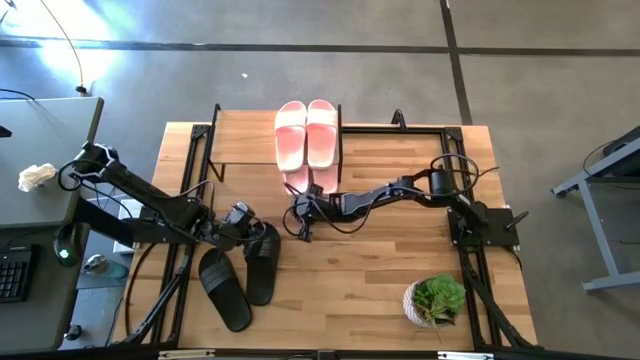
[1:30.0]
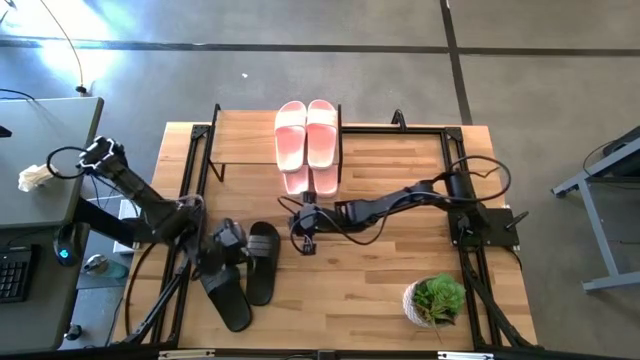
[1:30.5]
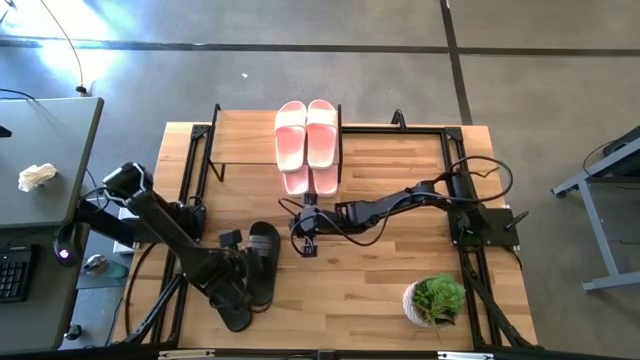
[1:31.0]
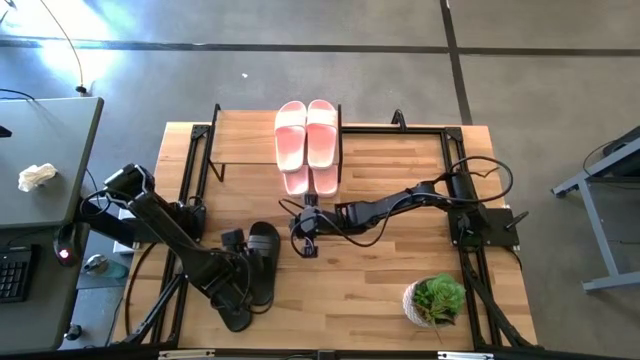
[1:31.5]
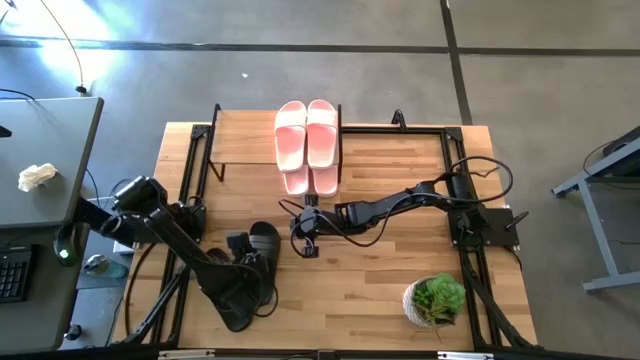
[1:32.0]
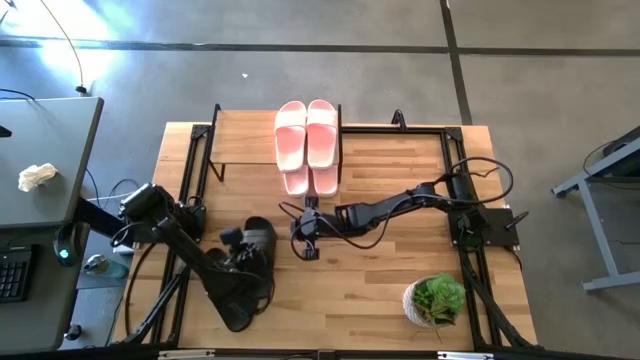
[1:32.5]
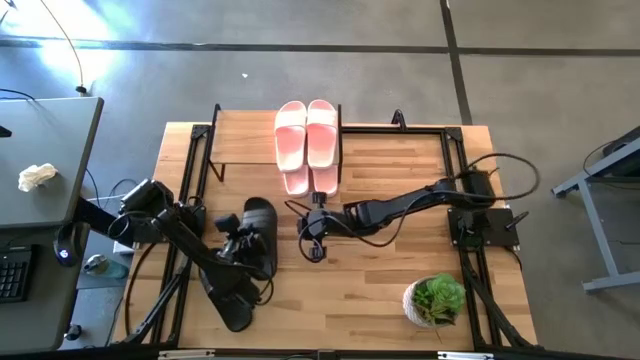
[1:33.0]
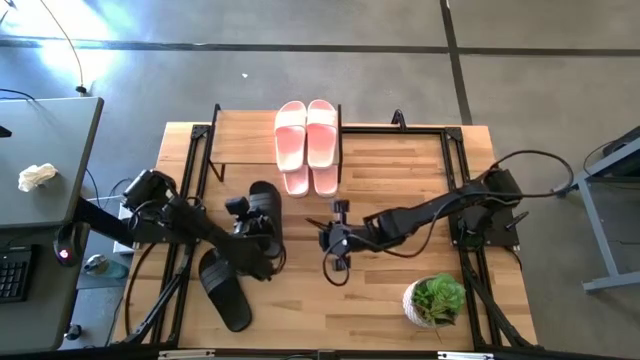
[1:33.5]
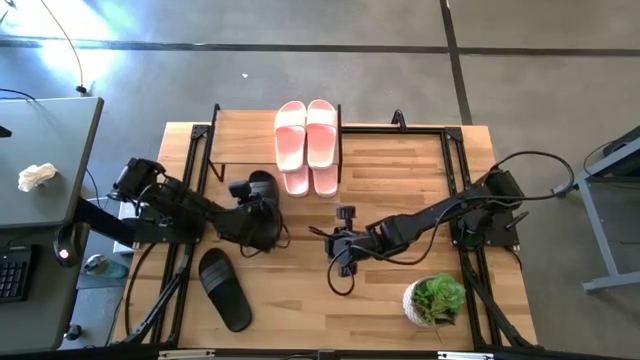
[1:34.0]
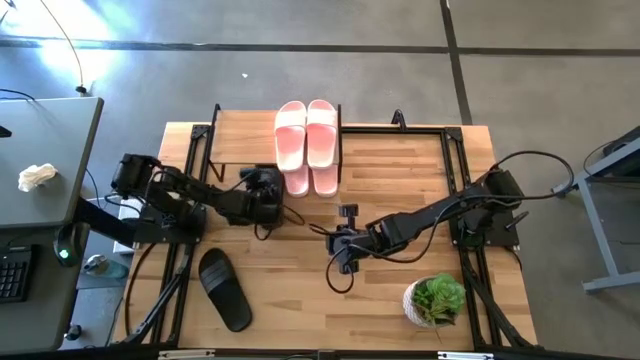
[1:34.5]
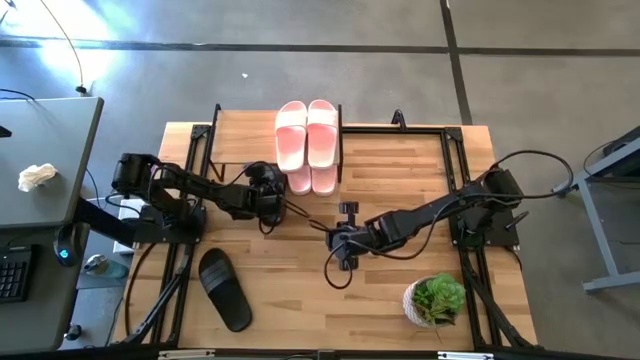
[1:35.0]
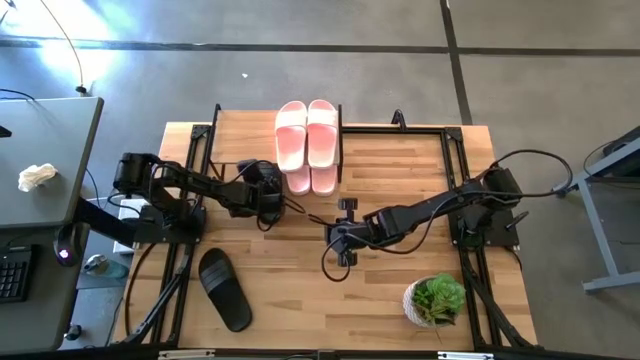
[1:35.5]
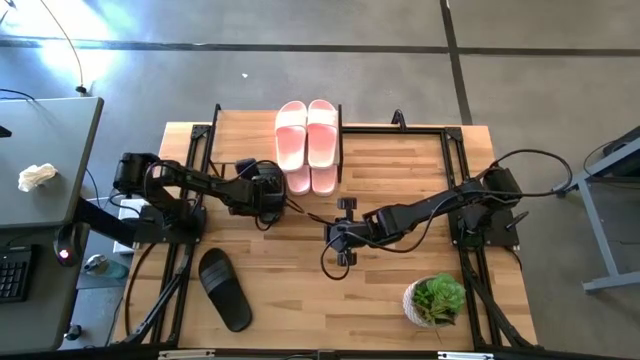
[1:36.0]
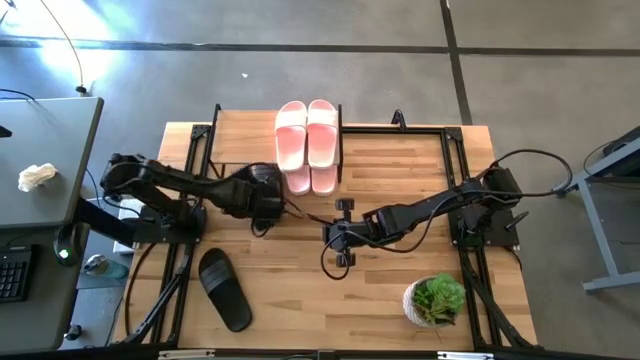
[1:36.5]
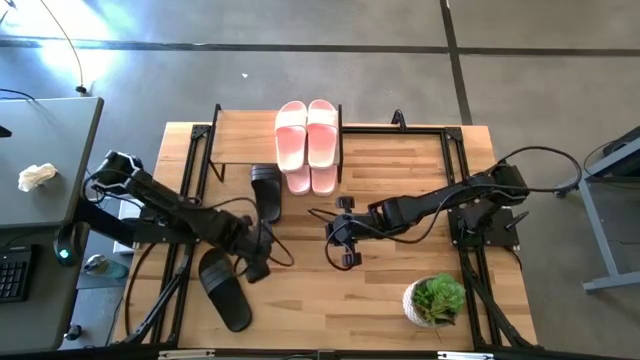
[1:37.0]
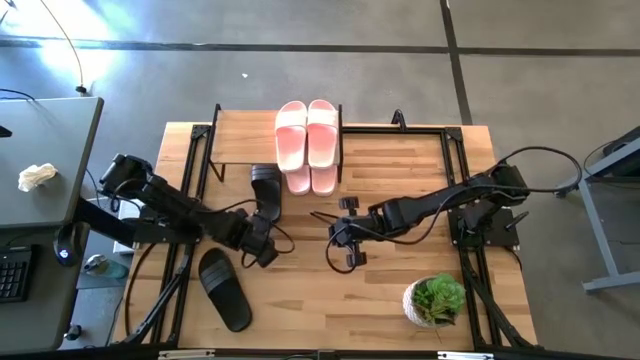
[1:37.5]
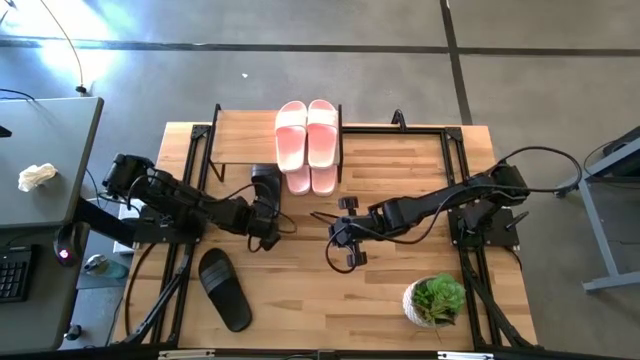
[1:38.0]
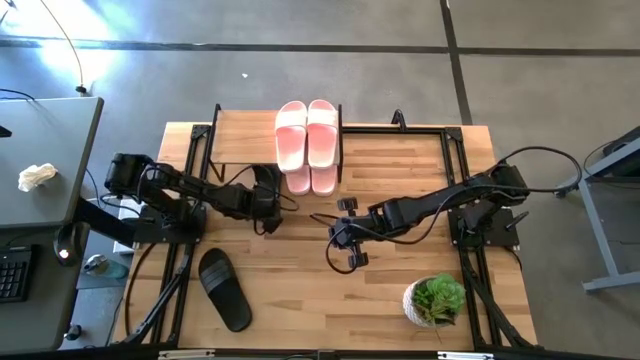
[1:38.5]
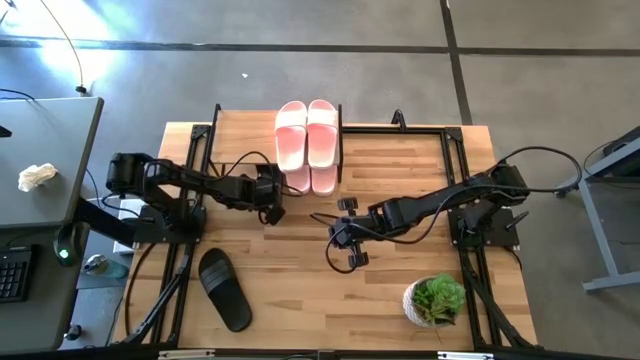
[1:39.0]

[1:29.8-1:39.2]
Task: Pick and place slides into the shelf
Put the black slide under the shelf

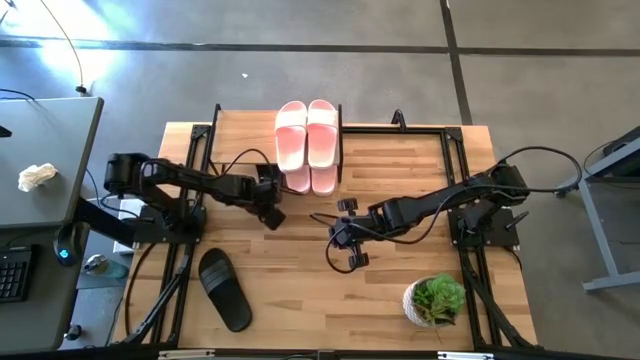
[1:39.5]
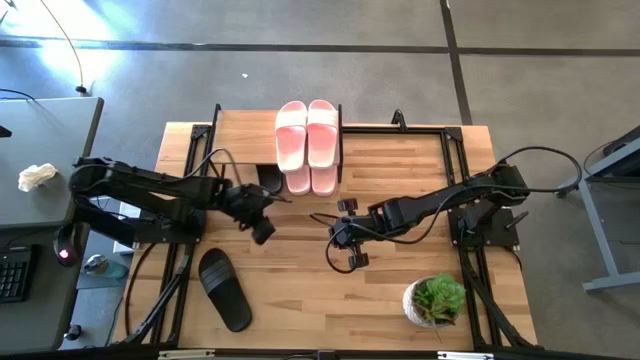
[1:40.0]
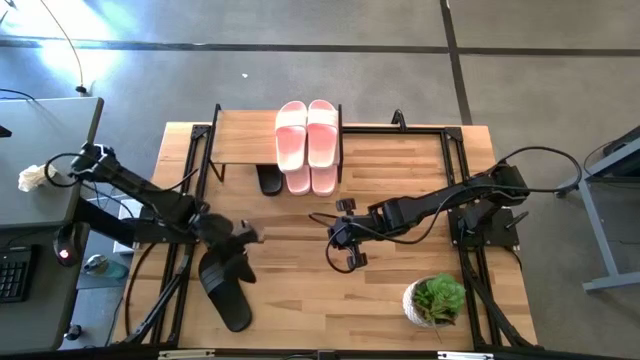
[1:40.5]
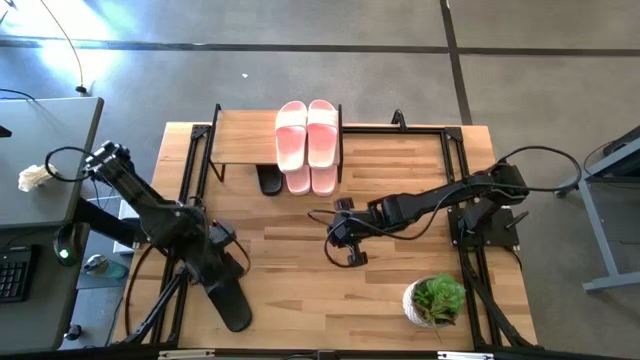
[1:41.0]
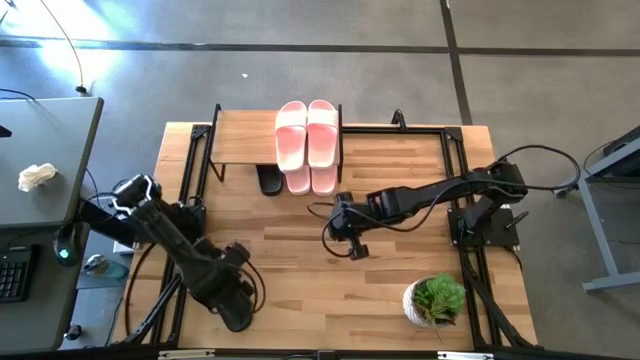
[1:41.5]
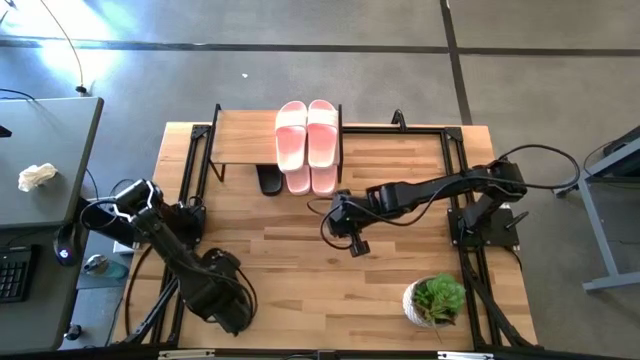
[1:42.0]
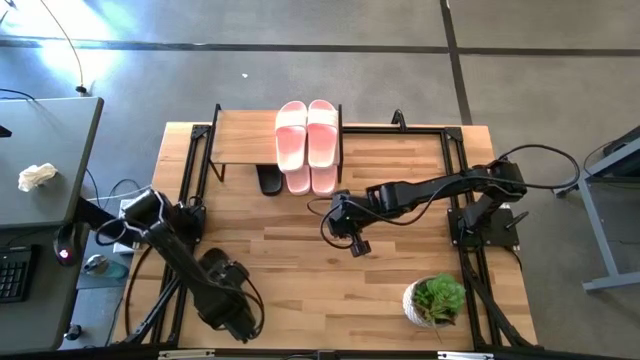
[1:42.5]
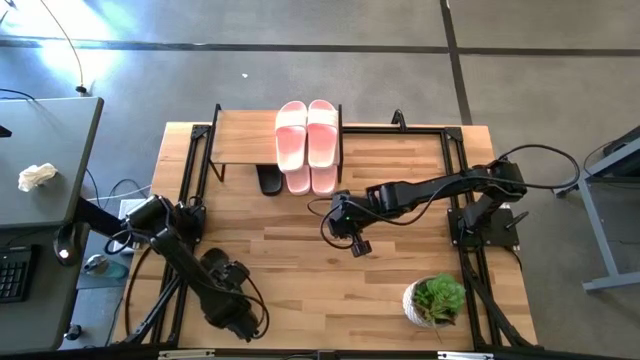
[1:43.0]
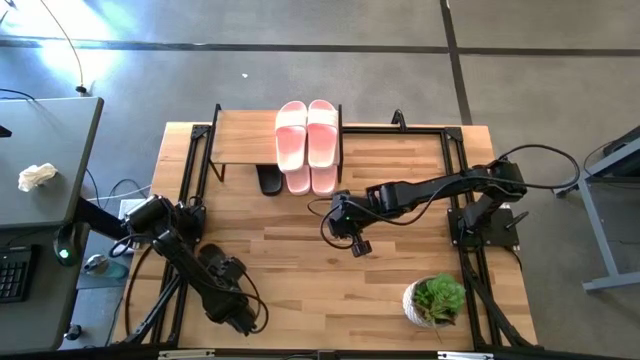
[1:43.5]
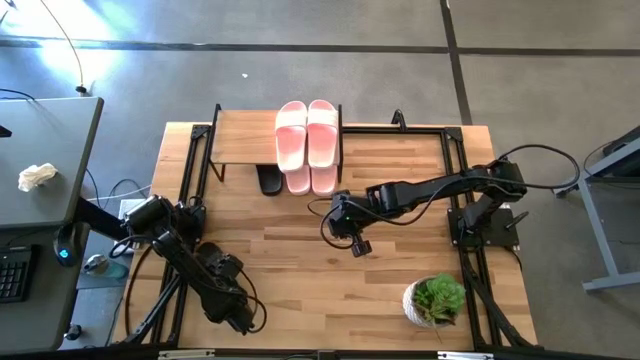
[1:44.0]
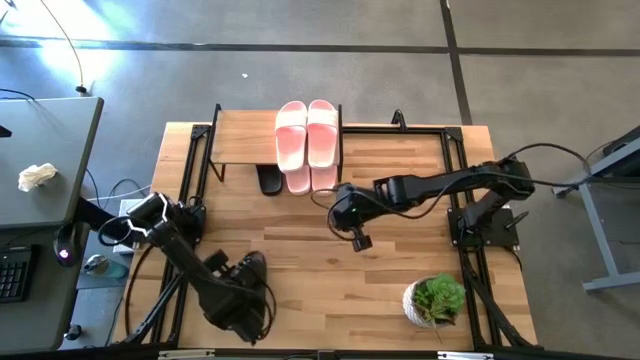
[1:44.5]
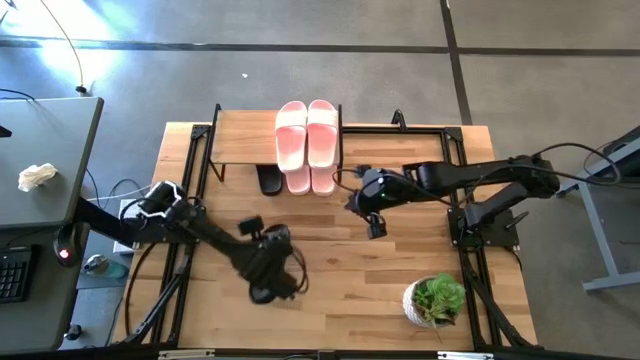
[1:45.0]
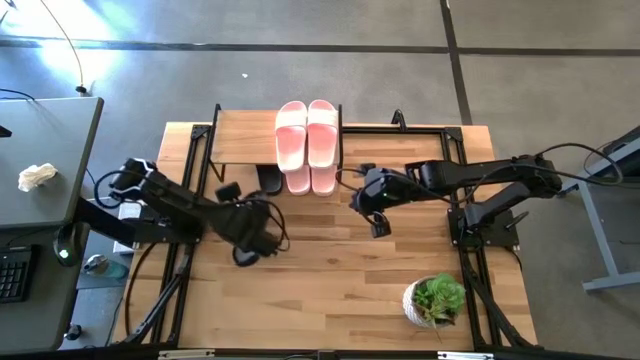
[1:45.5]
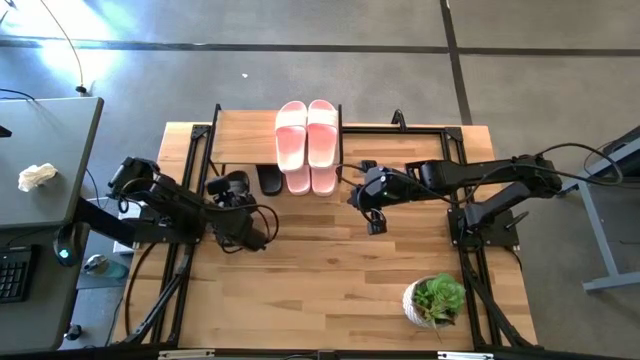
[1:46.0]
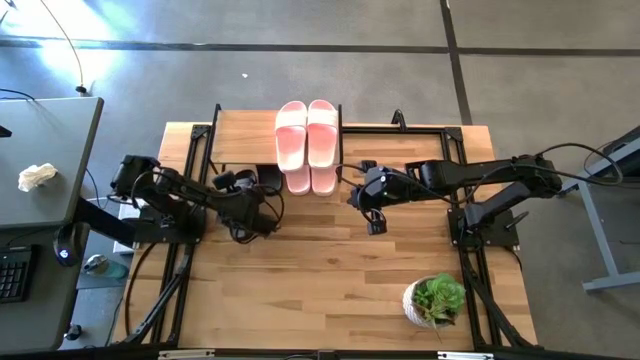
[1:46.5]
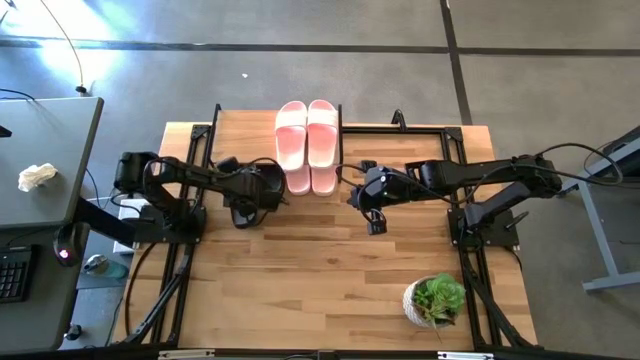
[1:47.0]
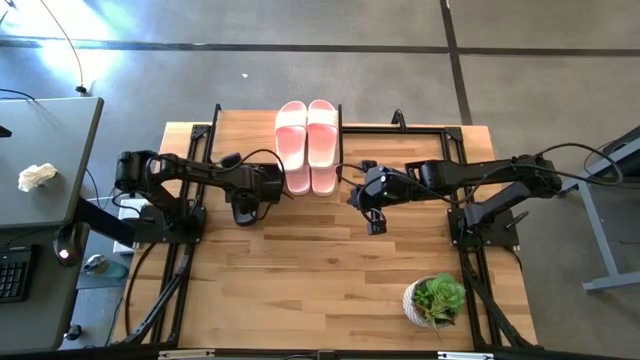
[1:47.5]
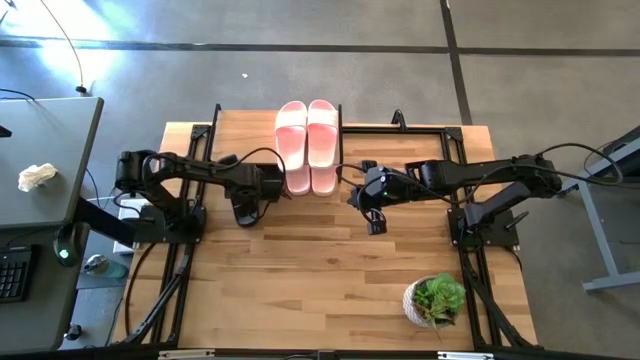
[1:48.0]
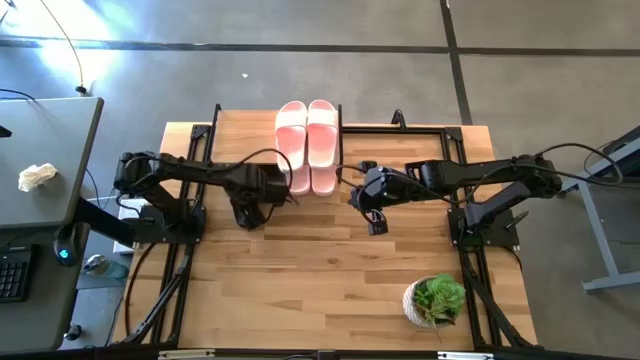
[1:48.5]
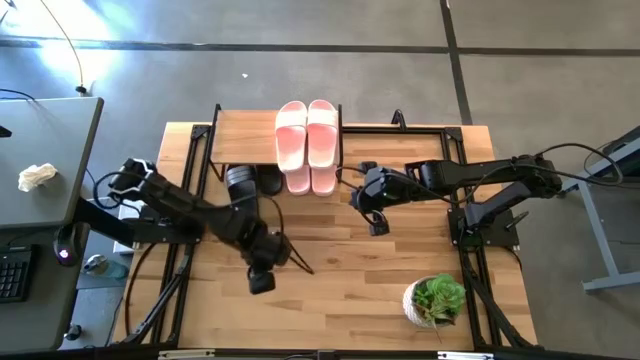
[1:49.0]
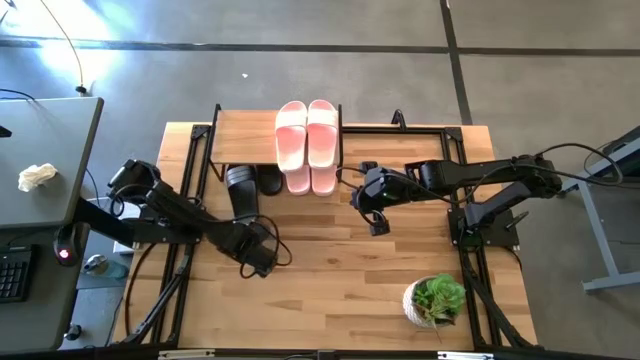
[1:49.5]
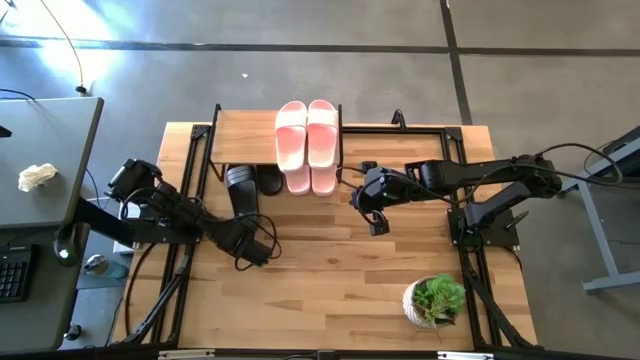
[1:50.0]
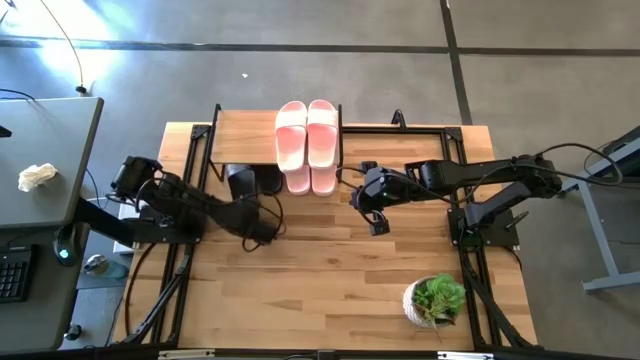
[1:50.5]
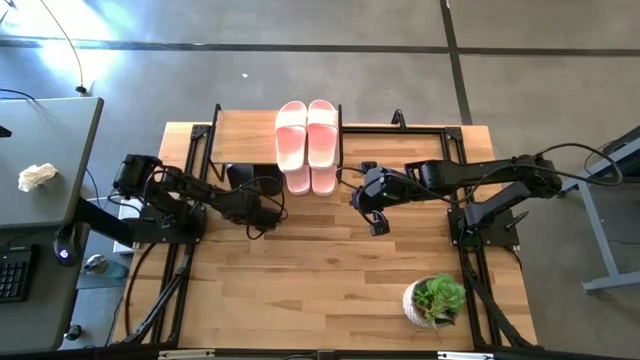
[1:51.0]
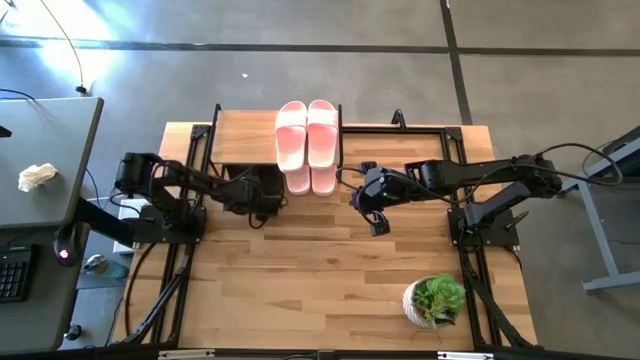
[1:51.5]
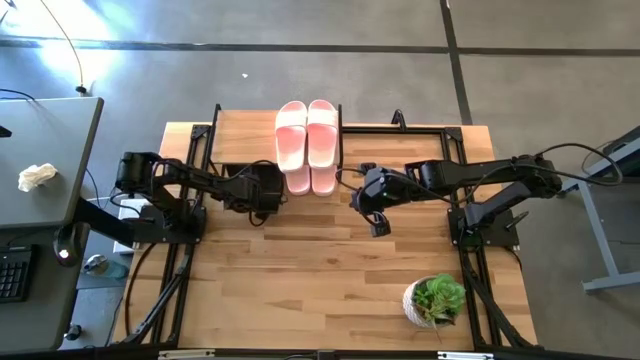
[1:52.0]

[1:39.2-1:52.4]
Put the black slide under the shelf

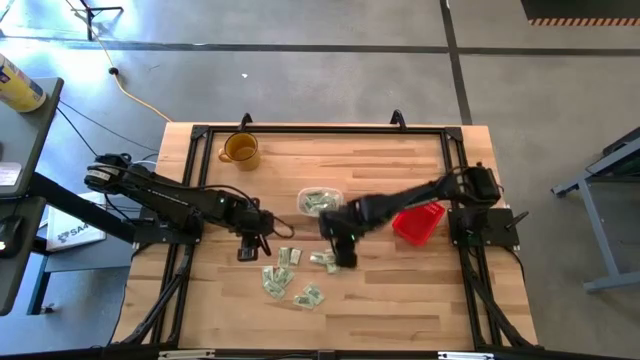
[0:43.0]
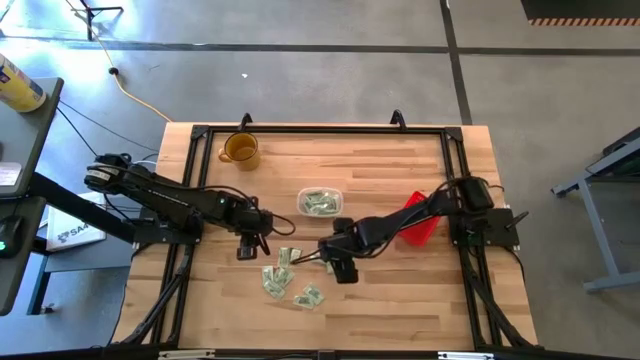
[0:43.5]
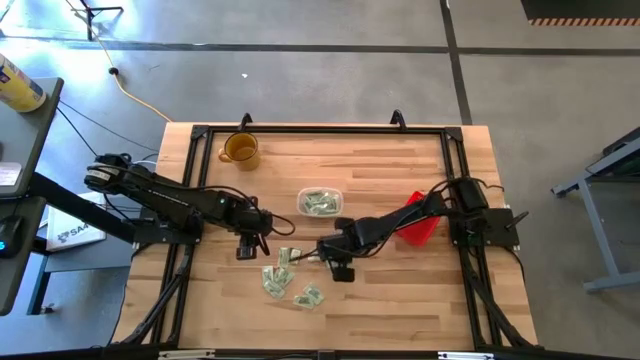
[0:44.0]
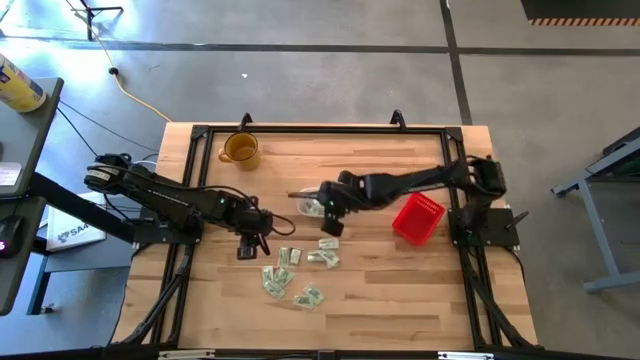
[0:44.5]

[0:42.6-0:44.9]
Task: Pick and place items into bin
Put the white stevia packet into the transparent bin
